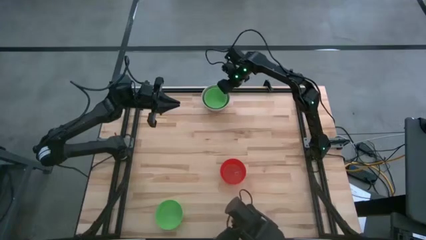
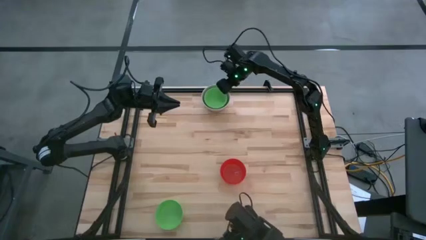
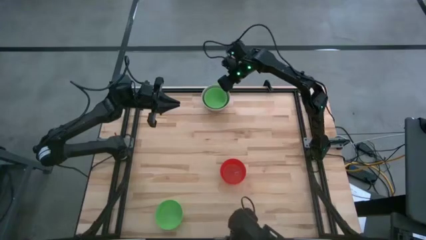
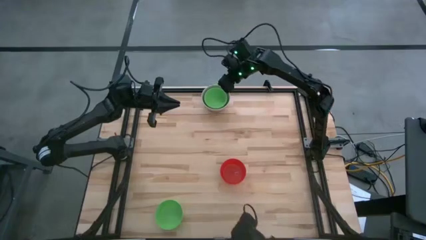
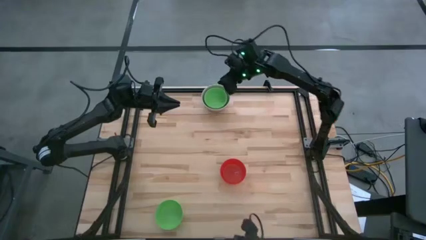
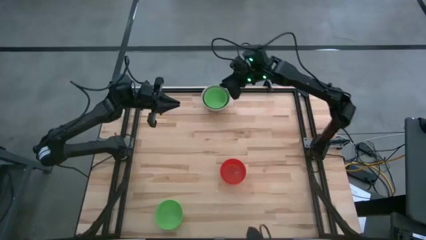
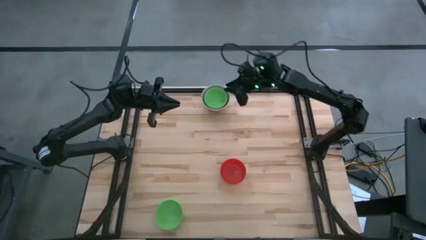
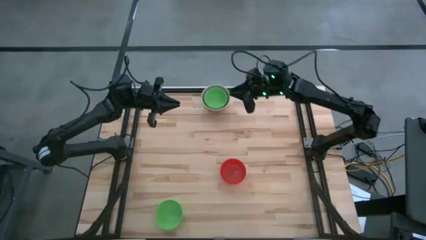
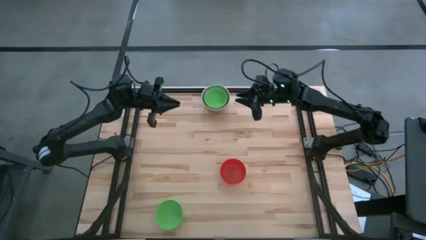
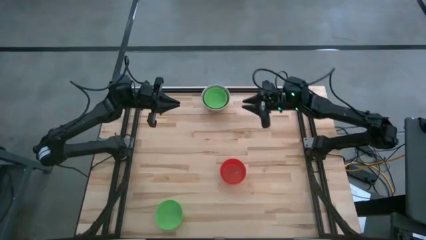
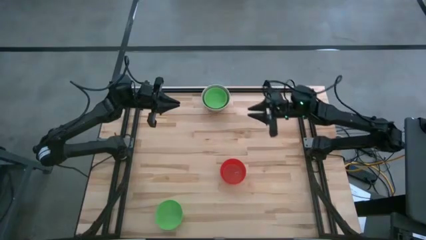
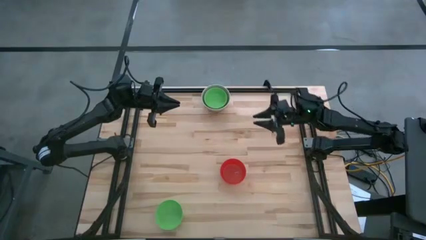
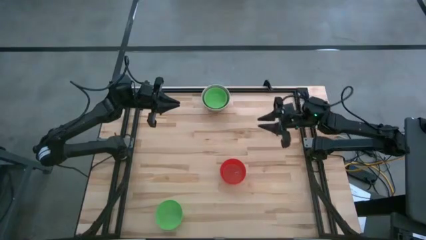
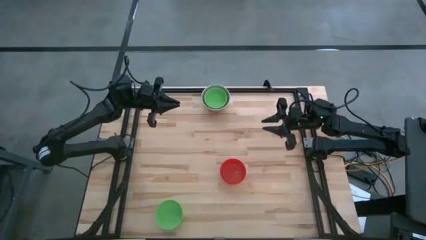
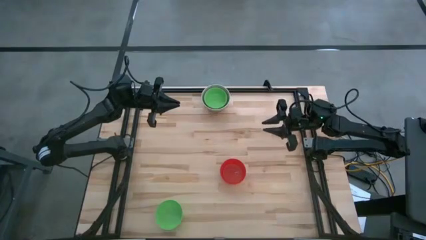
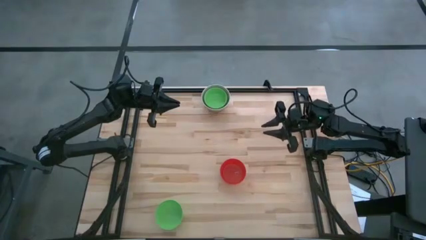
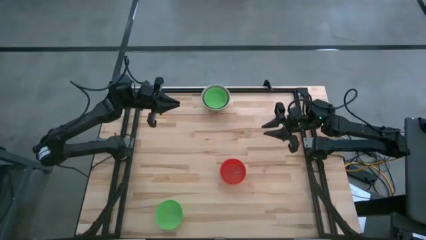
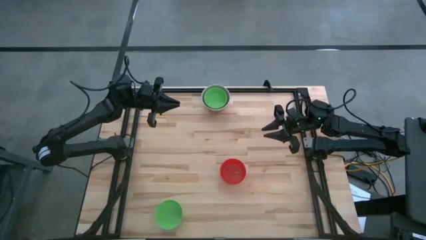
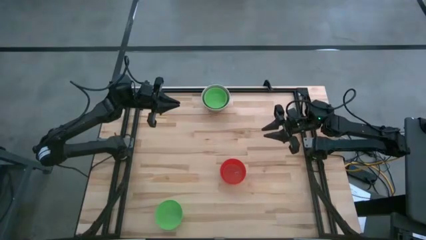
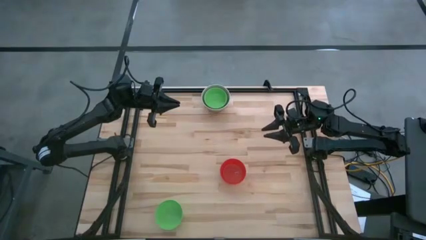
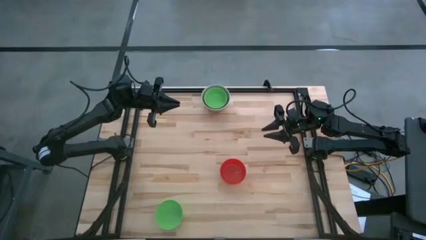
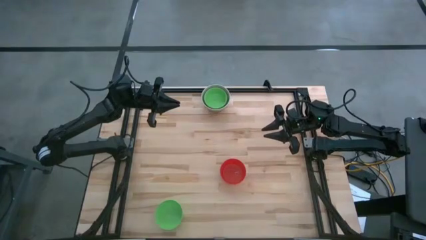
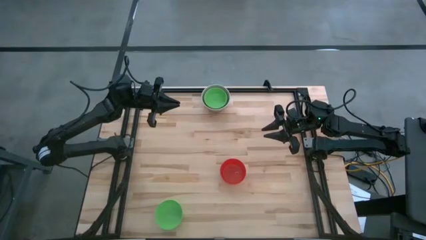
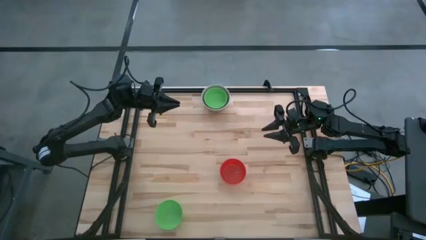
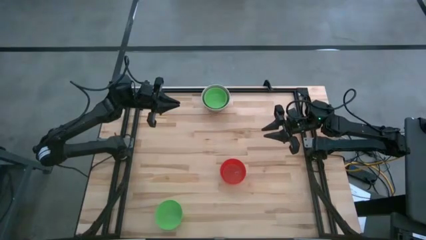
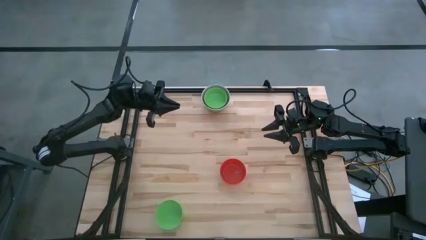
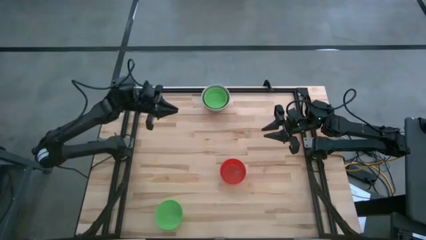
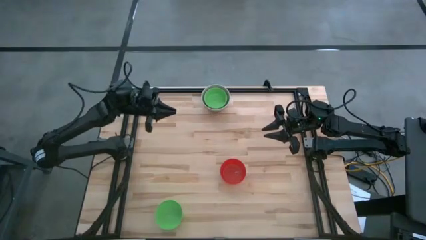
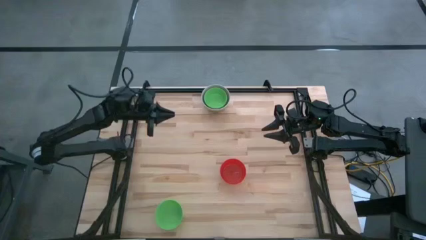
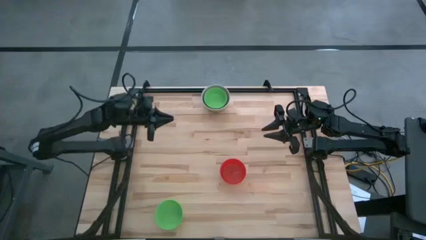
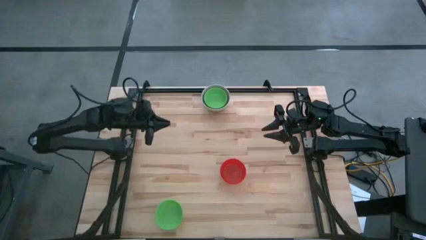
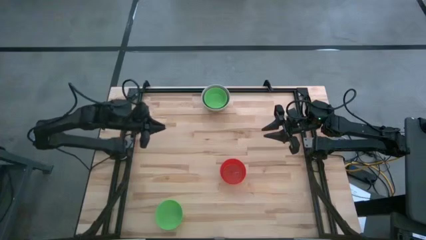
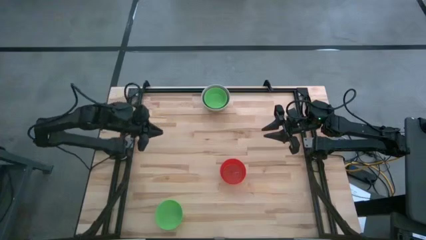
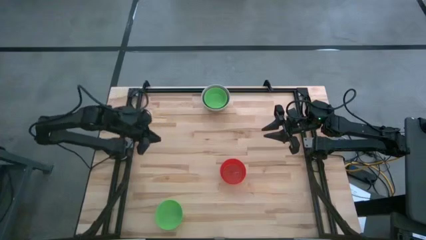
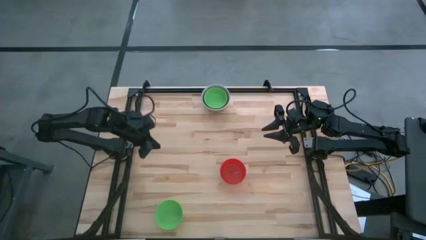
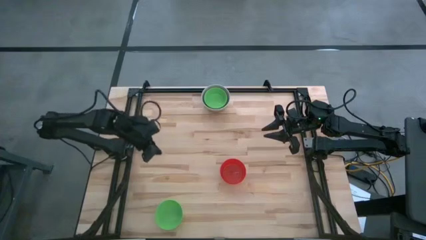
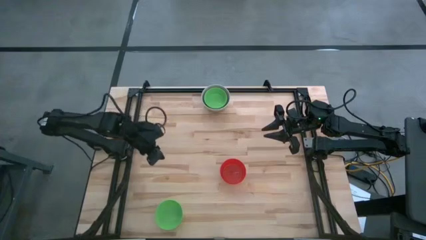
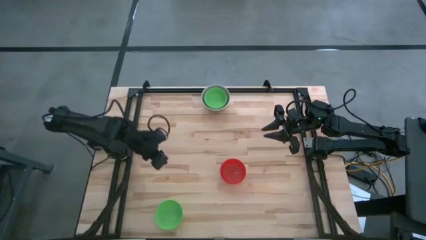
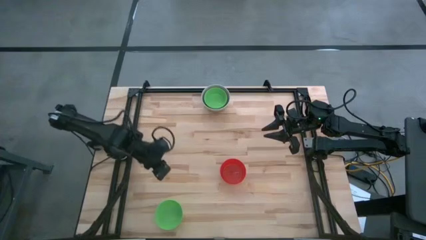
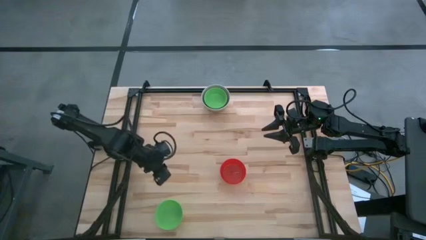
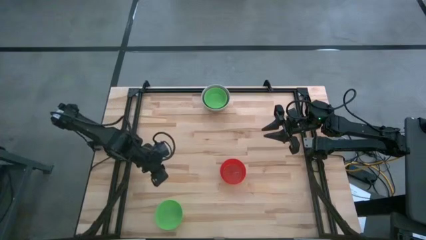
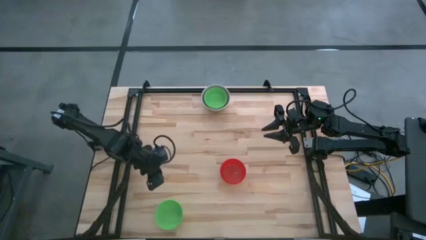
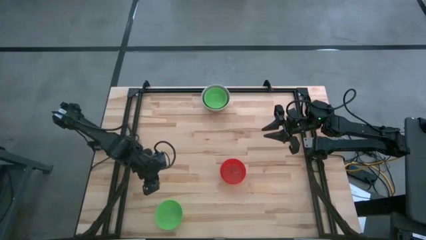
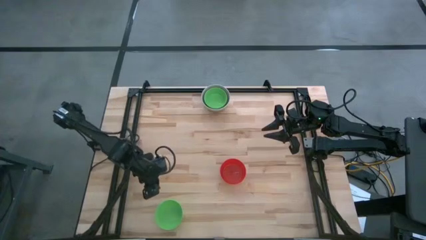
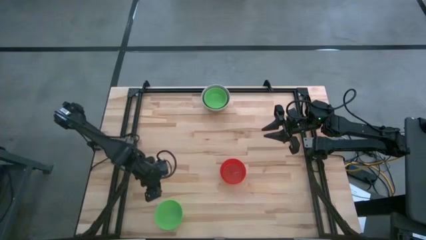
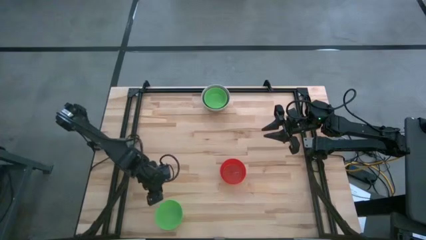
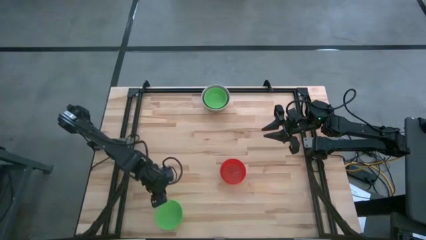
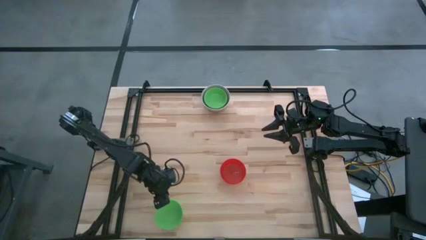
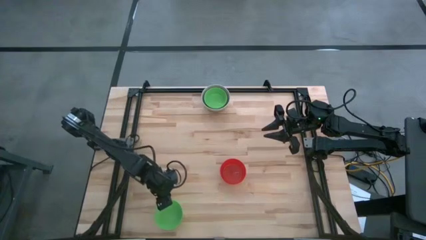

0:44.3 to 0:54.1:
Stack the green bowl on top of the green bowl

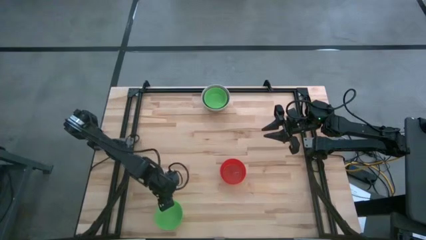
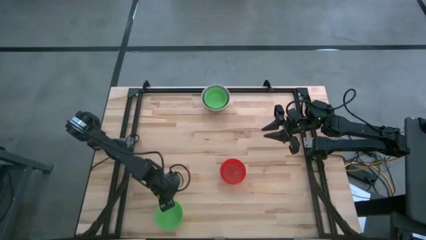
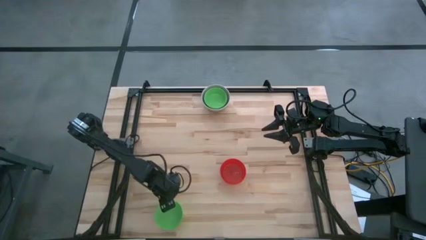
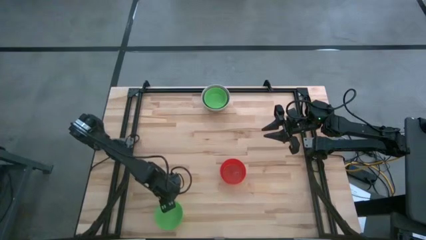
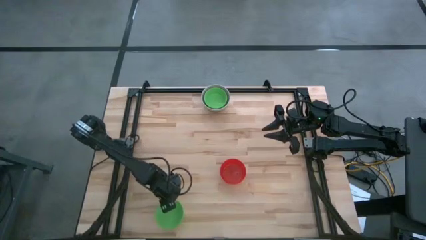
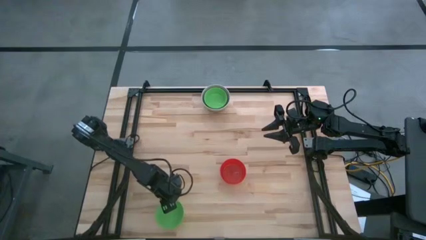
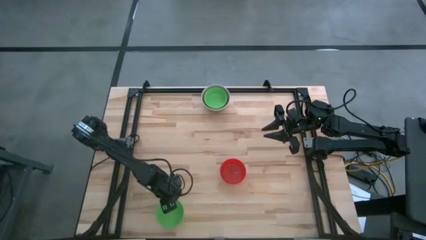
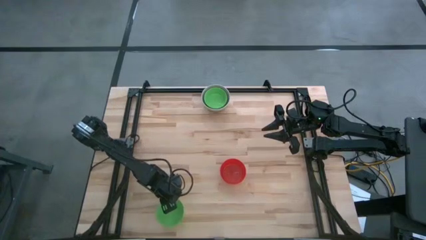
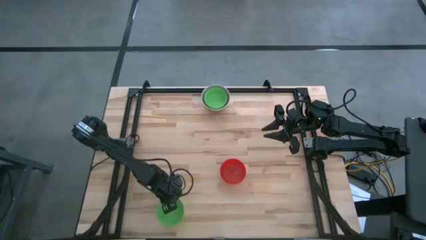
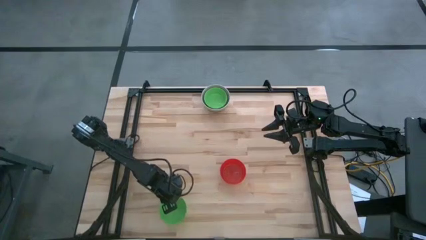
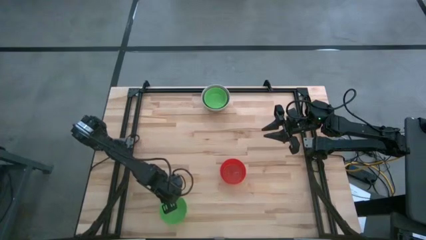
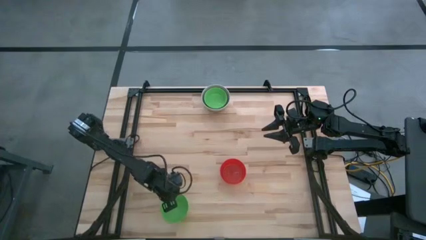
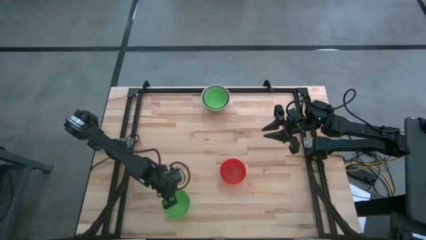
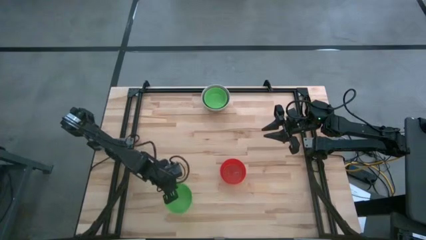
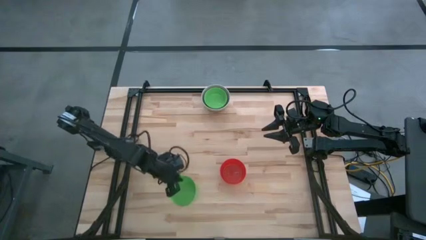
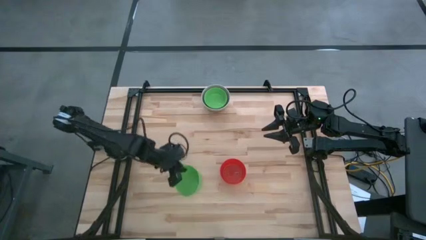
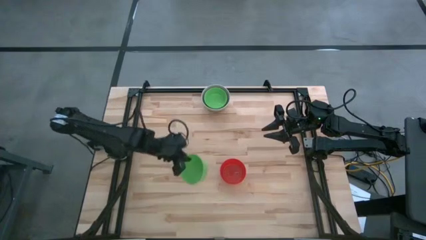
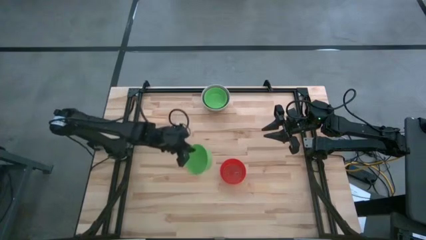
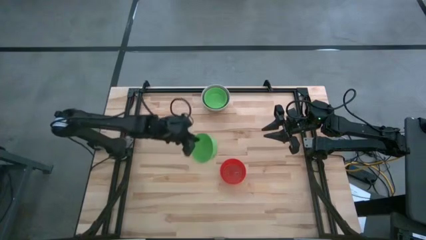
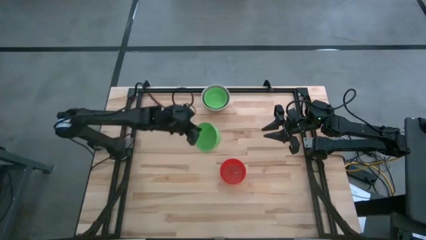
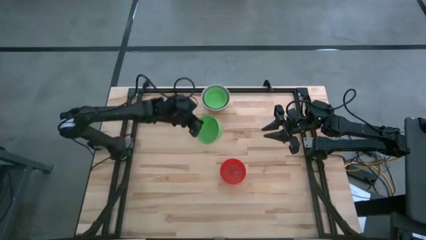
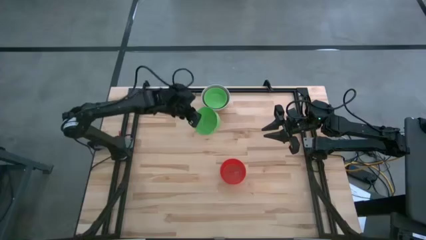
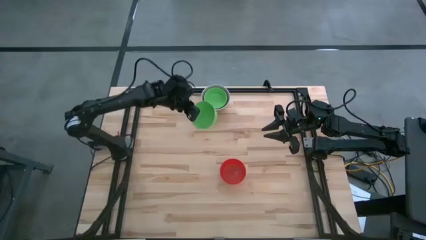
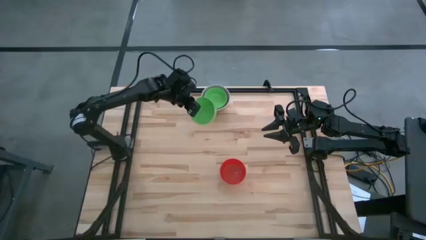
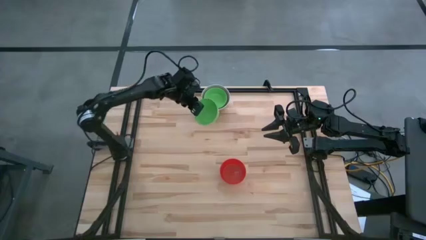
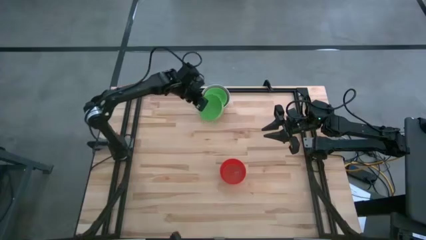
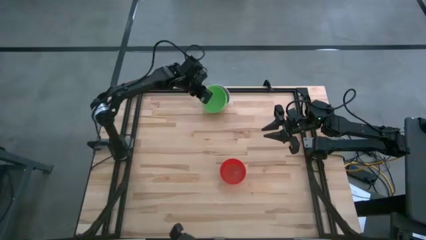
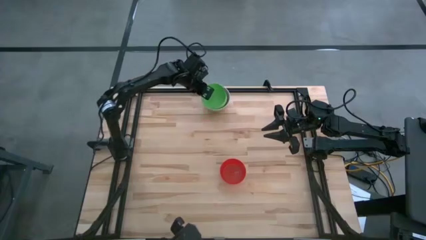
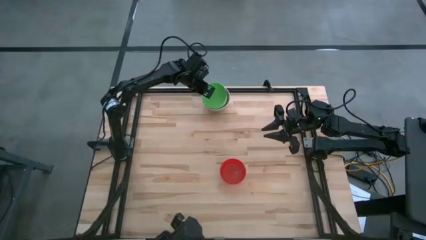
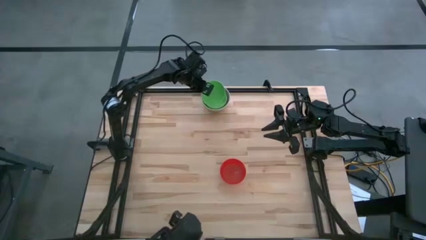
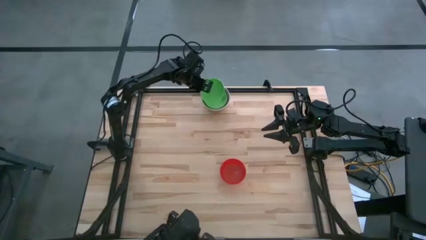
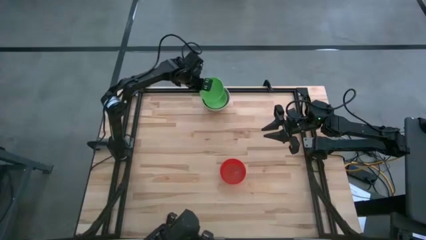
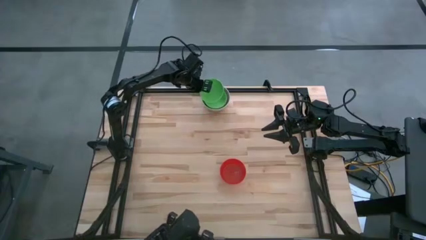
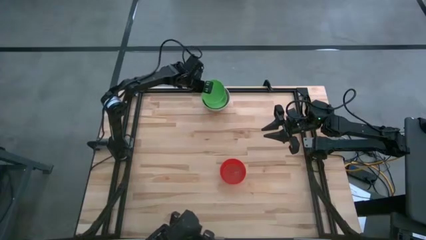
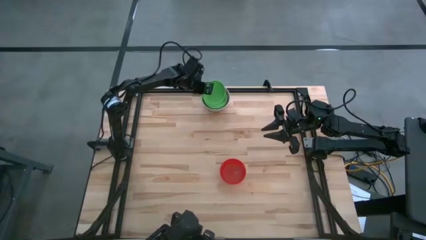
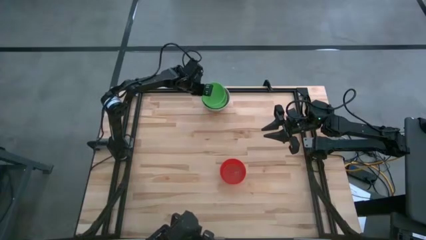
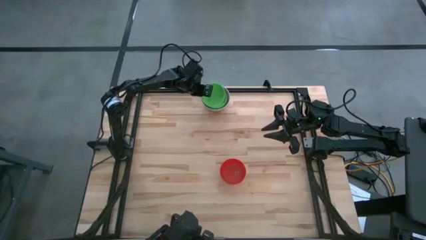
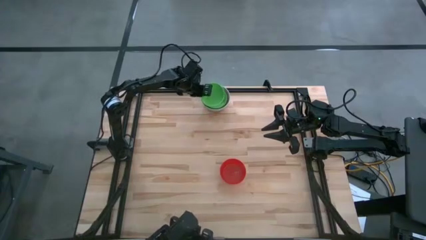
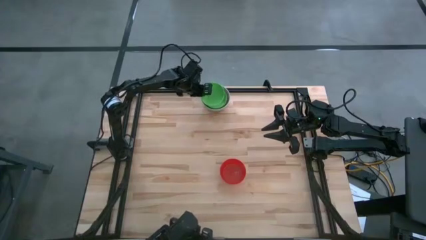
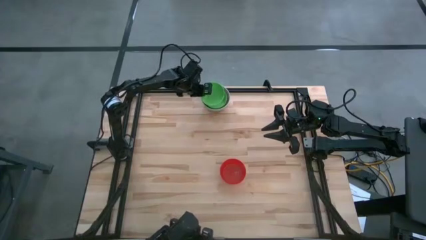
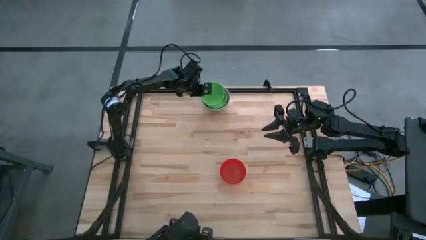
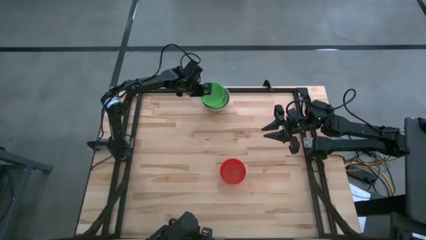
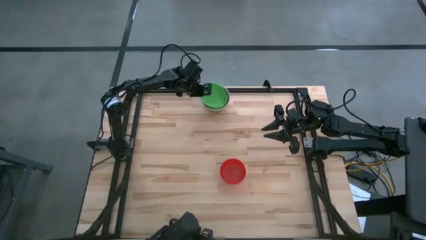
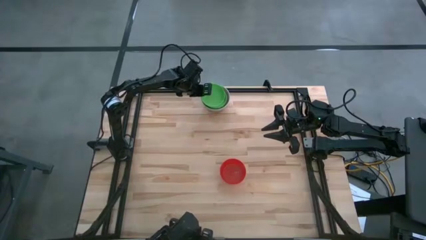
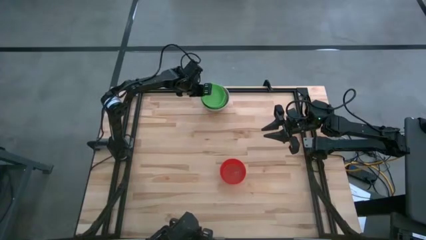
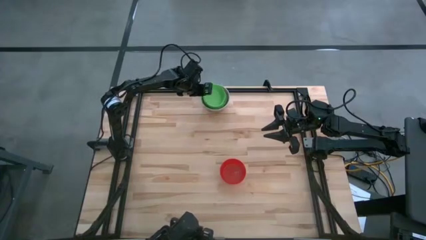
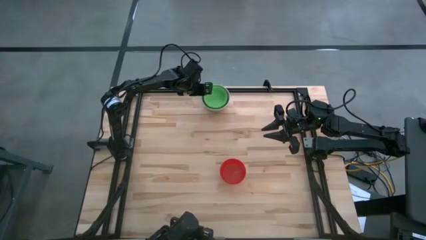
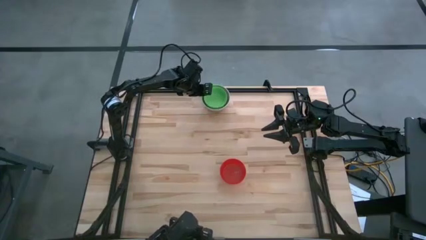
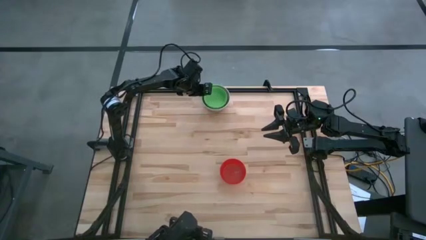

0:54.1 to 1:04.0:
Stack the green bowl on top of the green bowl
